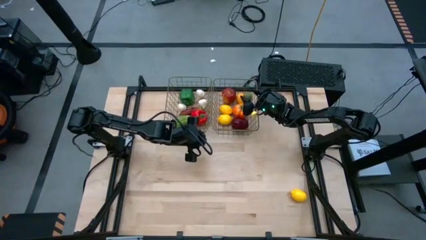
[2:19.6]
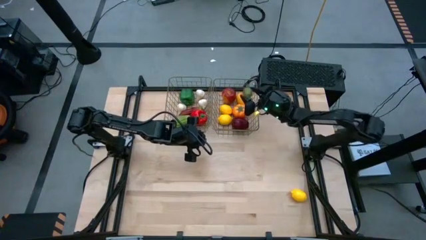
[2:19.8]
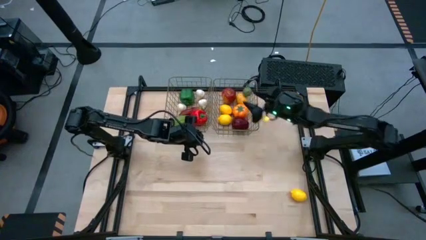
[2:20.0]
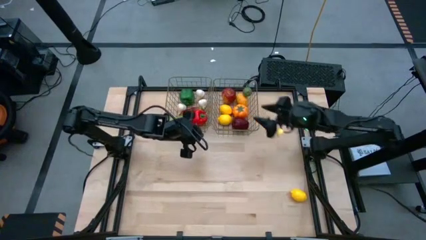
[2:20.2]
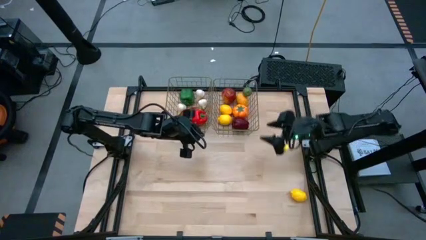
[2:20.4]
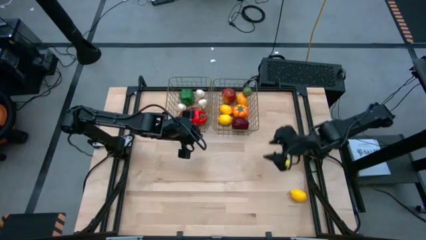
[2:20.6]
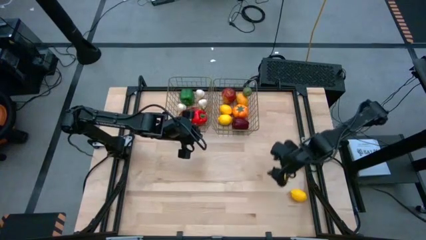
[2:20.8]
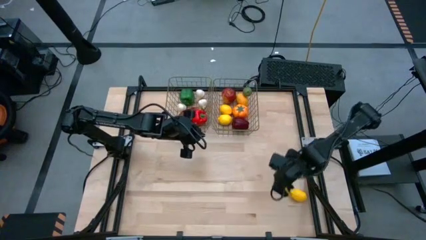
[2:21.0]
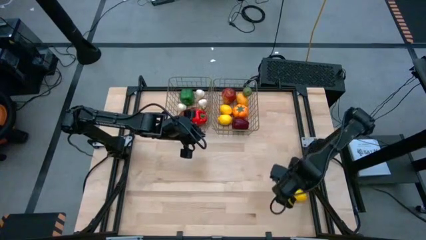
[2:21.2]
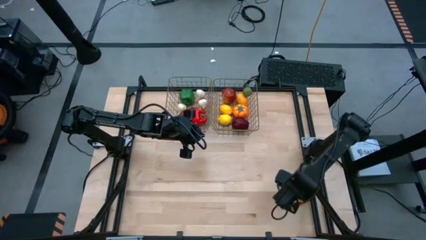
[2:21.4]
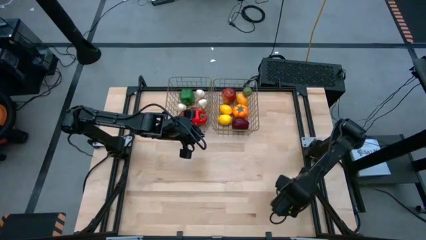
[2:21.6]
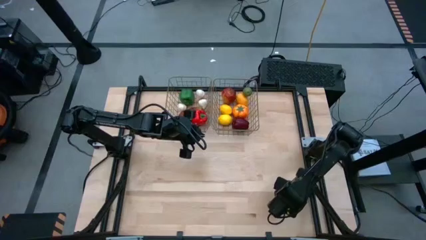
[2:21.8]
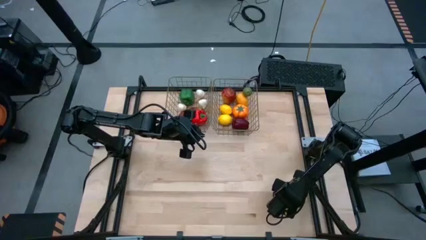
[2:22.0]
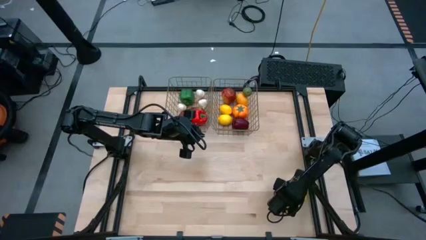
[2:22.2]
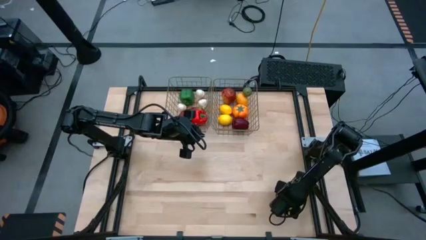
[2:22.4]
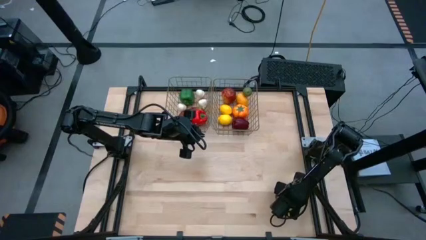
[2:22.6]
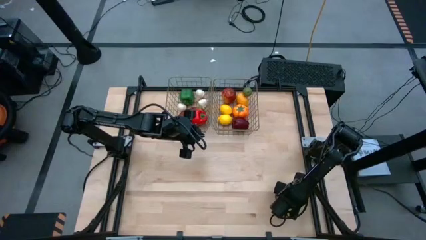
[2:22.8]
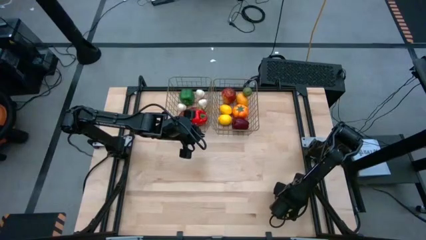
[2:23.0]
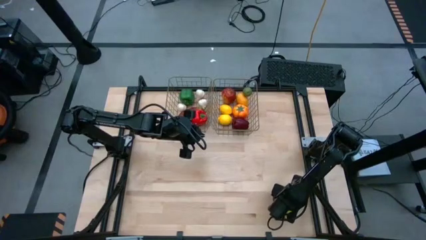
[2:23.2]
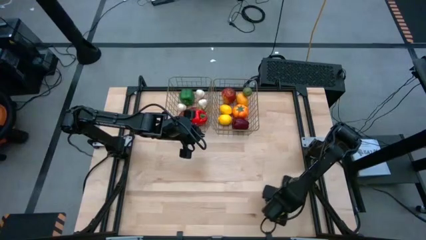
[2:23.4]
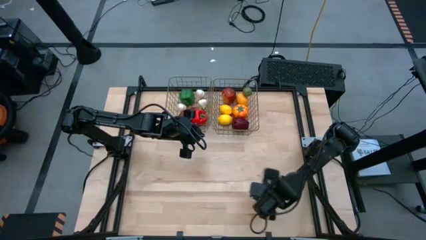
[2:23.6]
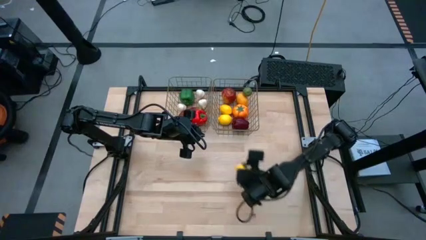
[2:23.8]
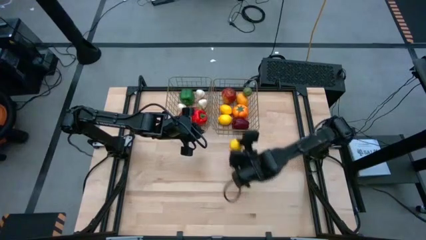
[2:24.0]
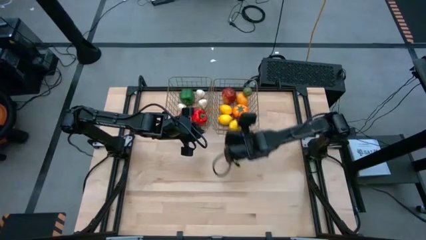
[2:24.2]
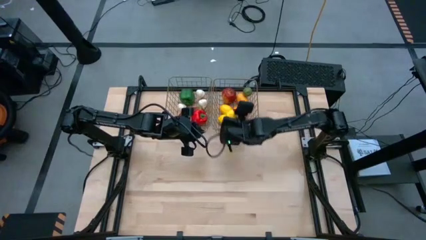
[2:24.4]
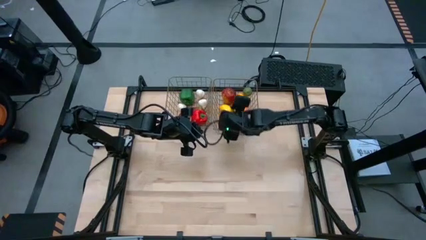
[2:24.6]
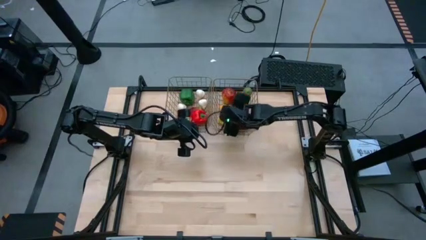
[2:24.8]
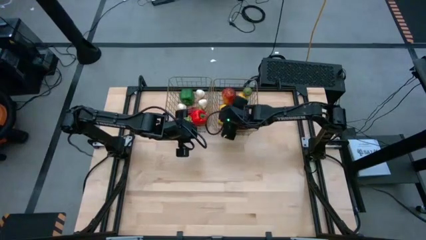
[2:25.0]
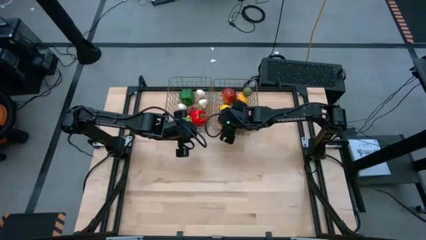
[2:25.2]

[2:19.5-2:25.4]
Task: Sort produce into baskets
Put the bottom right yellow lemon into the right mesh basket

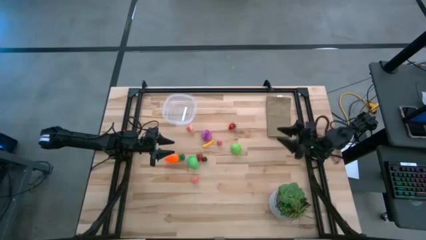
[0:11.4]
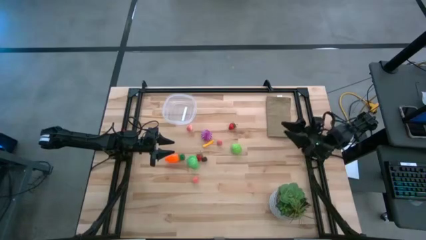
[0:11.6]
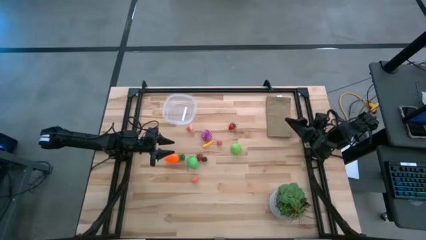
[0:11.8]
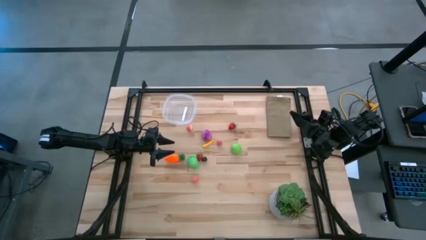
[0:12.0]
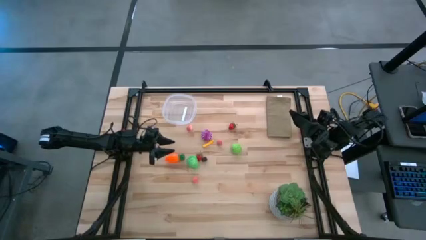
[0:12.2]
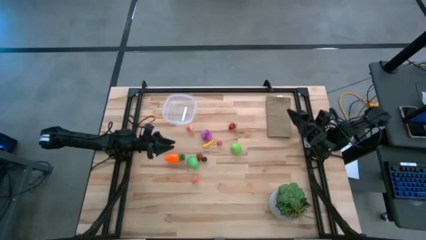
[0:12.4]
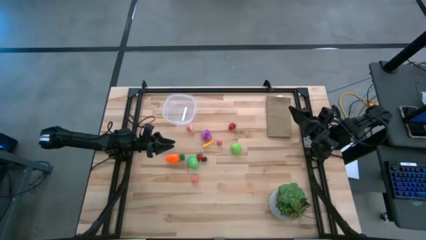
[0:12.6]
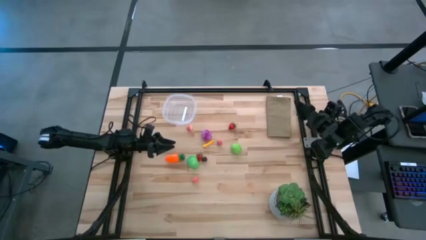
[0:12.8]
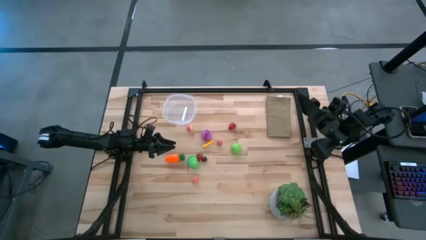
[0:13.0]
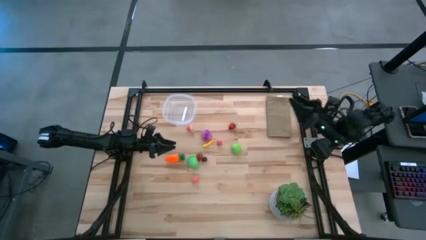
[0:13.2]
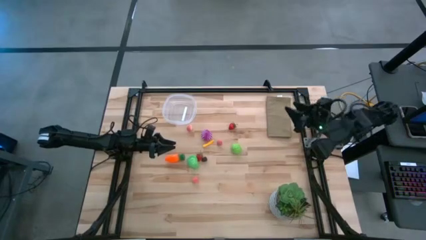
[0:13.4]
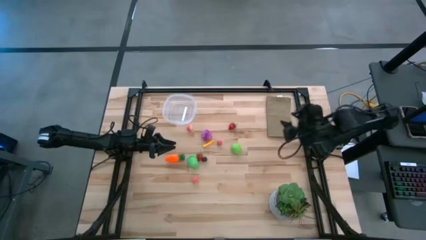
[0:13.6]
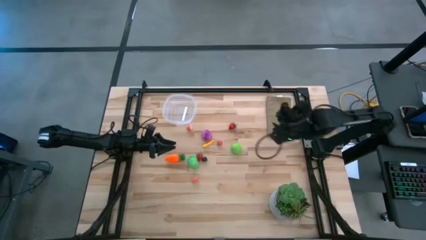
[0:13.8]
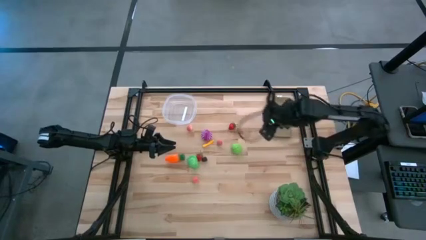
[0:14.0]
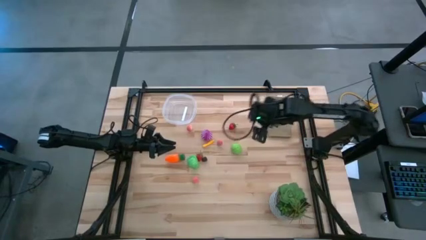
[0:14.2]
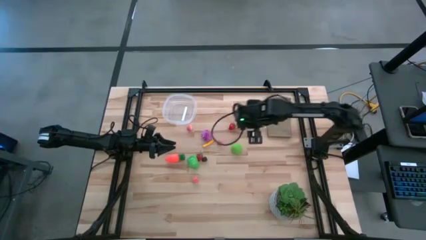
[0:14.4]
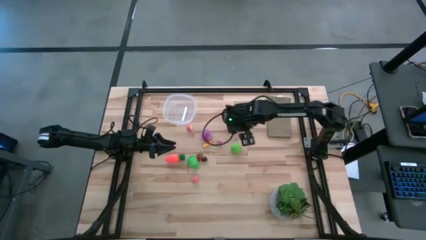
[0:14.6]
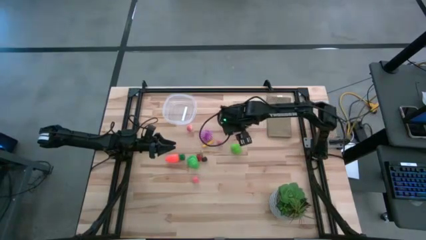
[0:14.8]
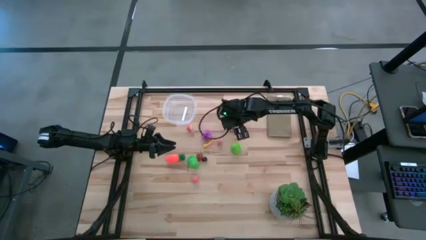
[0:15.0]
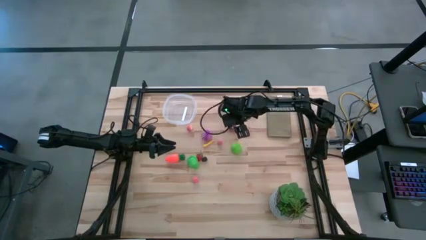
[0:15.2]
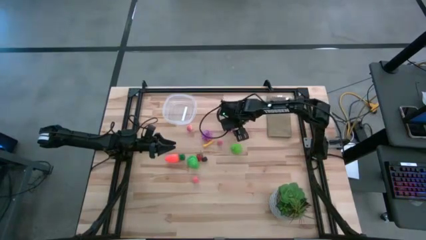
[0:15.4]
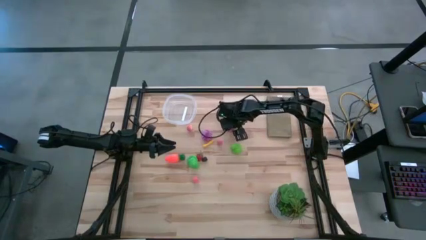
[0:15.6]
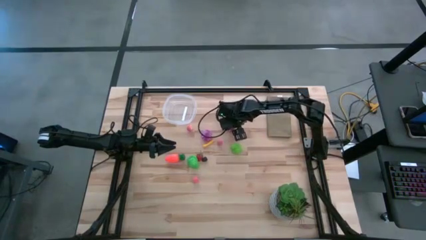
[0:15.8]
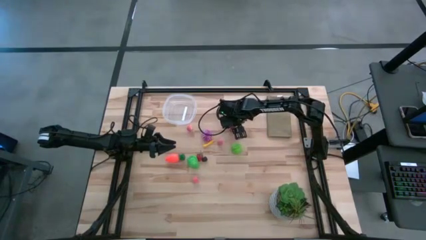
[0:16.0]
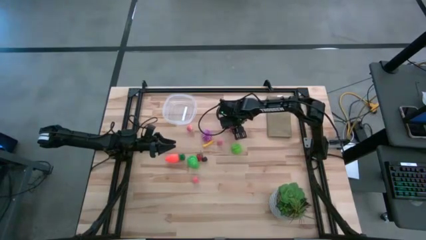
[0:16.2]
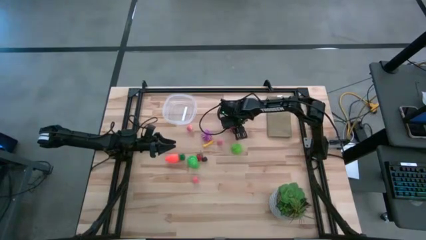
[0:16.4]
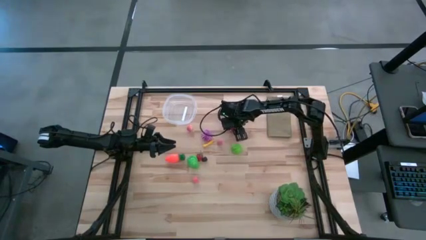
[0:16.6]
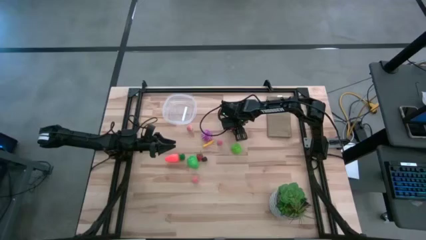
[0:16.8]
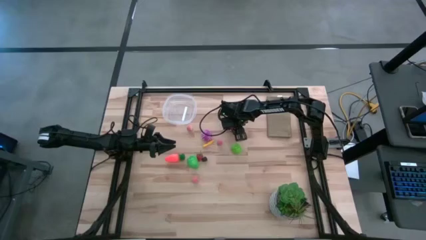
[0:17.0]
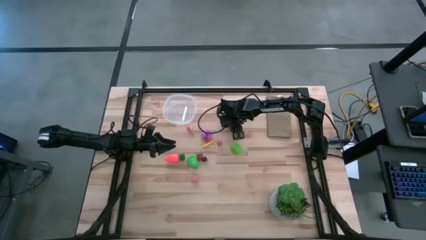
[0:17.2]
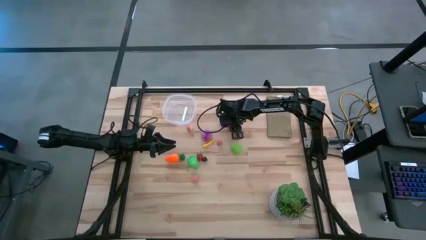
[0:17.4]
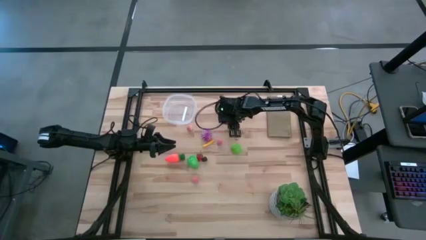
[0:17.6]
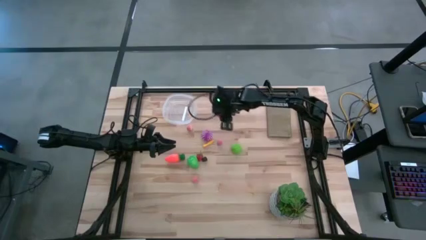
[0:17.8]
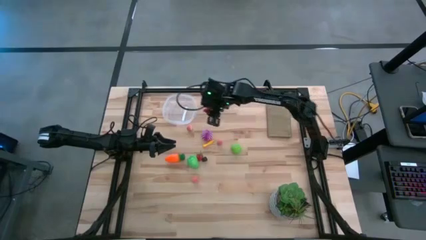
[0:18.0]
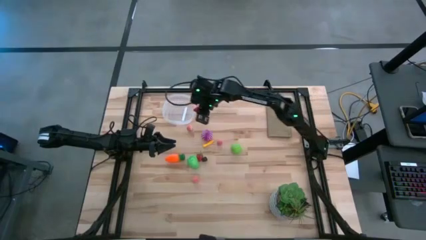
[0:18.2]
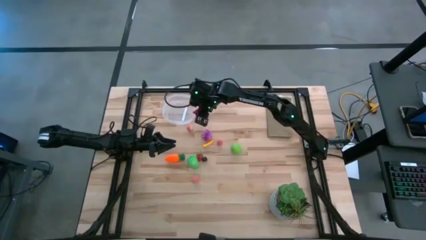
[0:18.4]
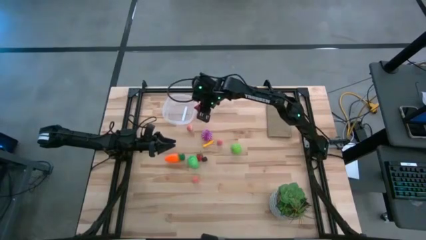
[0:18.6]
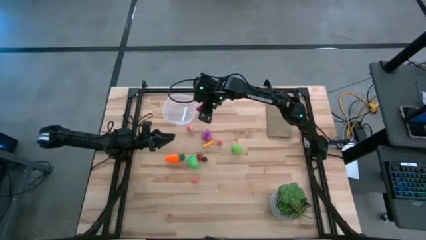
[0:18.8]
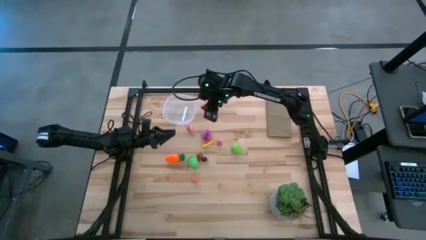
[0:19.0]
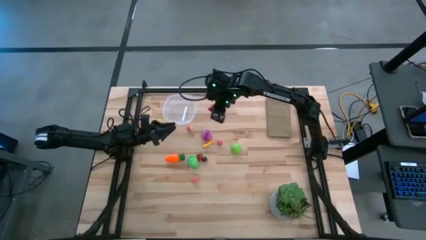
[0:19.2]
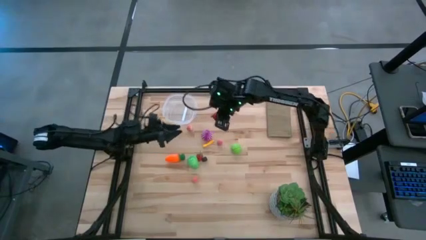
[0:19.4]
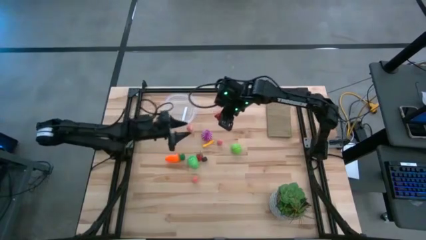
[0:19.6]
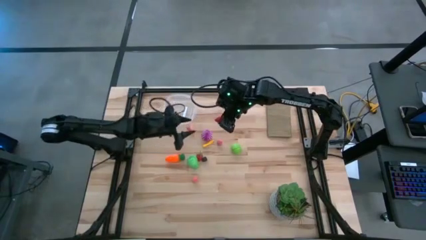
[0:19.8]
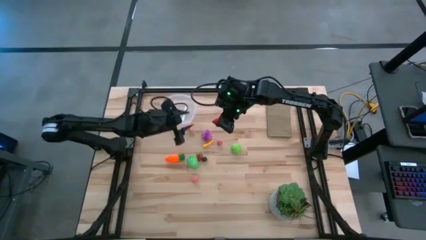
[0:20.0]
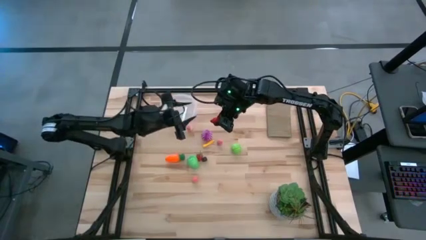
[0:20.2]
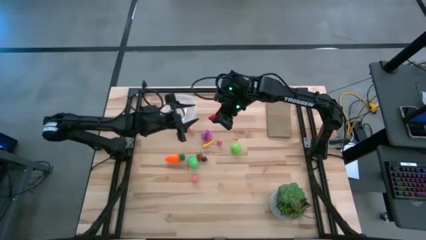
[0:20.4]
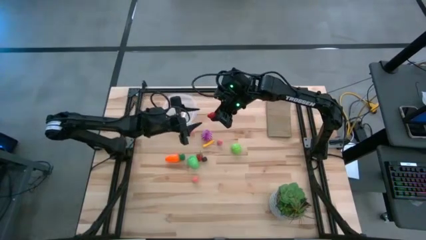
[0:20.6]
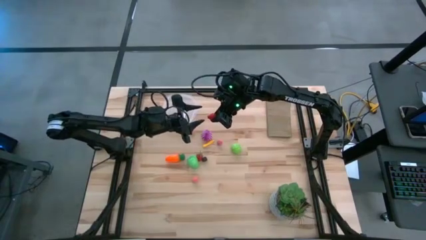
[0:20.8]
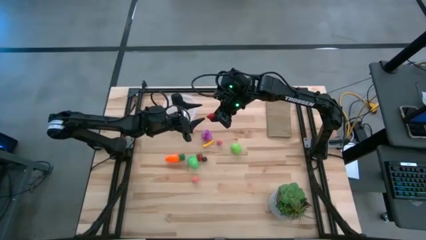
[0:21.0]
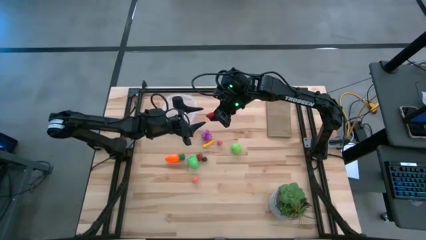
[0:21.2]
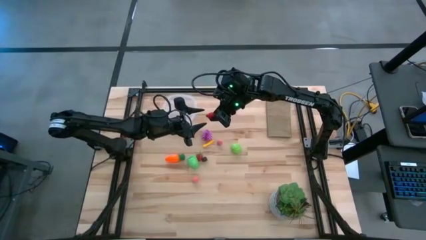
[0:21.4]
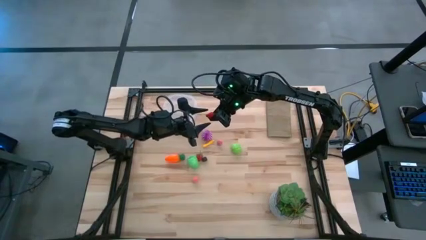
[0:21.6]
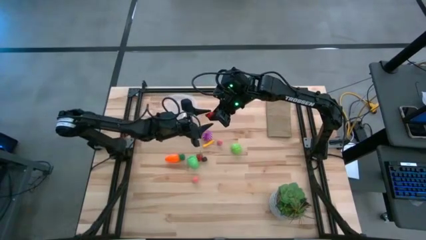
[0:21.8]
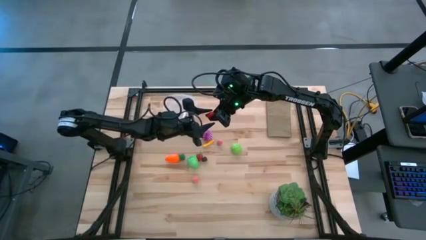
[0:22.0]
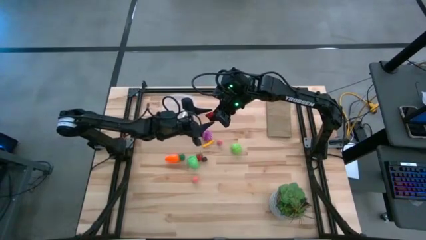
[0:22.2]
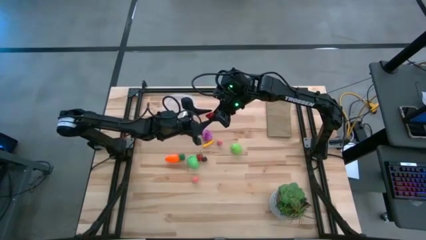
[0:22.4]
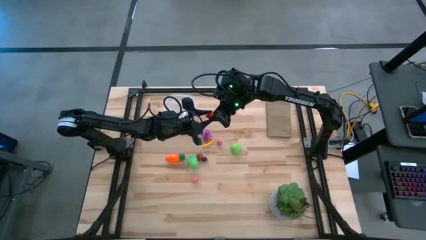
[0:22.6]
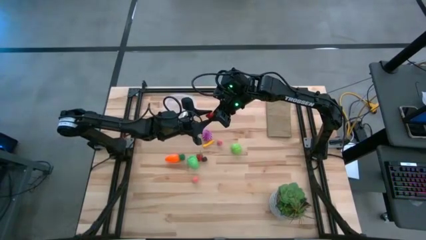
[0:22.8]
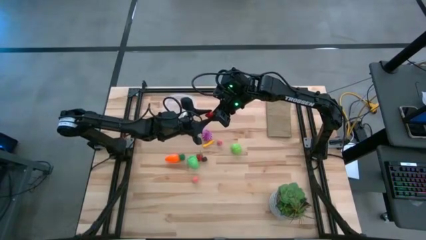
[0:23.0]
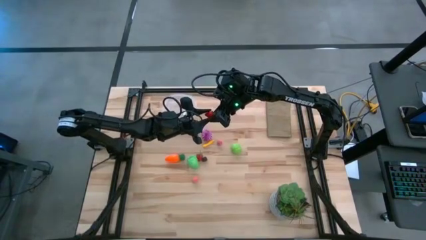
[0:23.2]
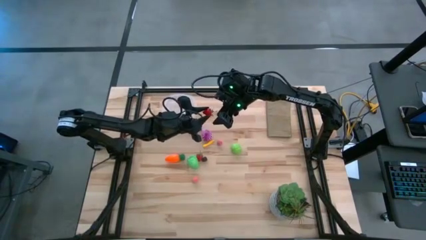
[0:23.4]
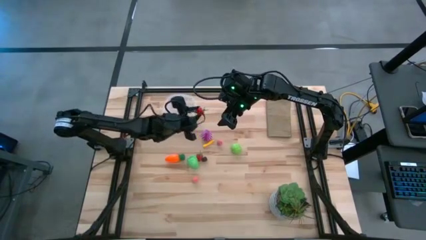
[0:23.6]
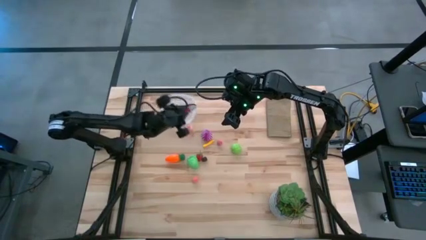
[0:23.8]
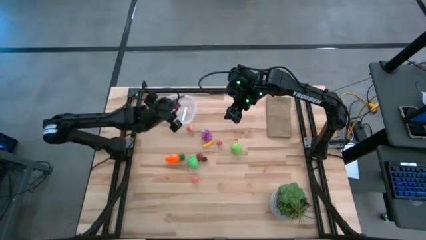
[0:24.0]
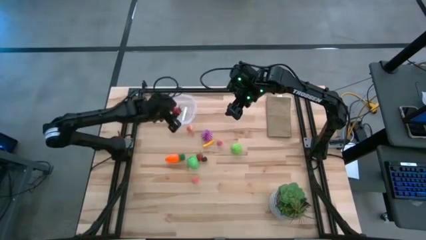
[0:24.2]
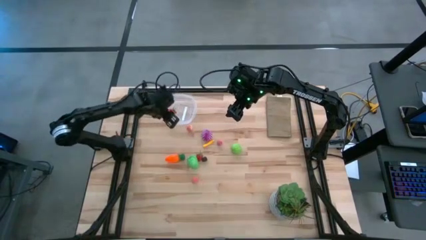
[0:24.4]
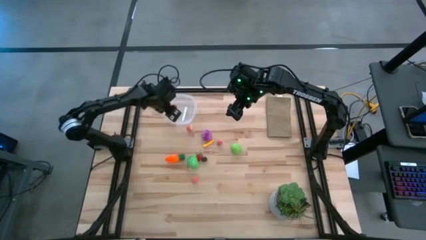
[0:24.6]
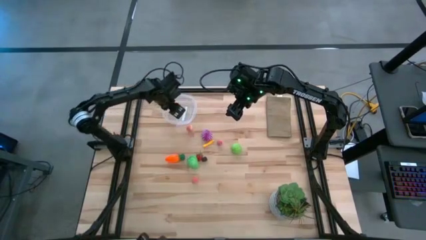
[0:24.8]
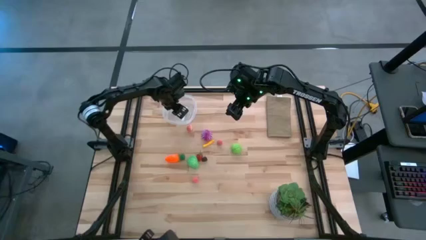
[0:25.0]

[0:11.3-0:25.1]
Task: Pick and placing Produce into tupperware
Put the strawberry into the transparent bin
